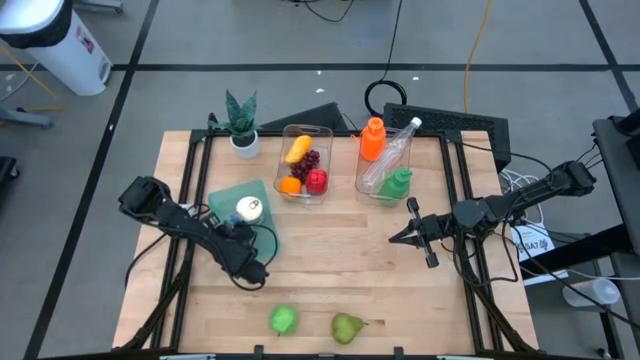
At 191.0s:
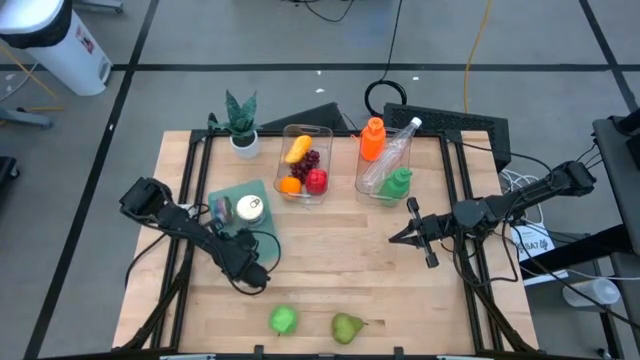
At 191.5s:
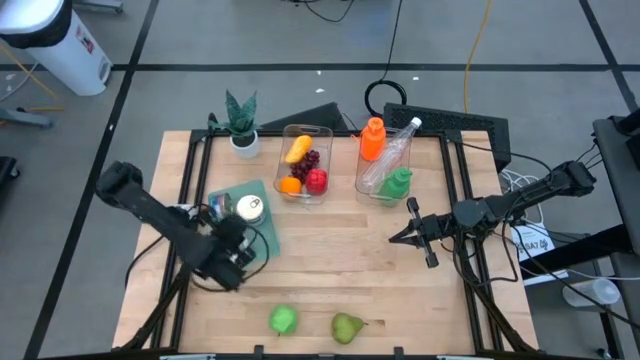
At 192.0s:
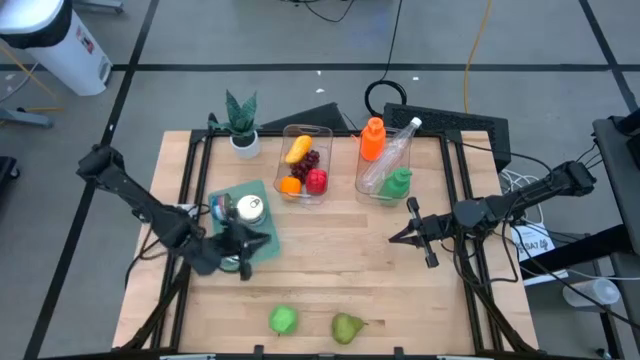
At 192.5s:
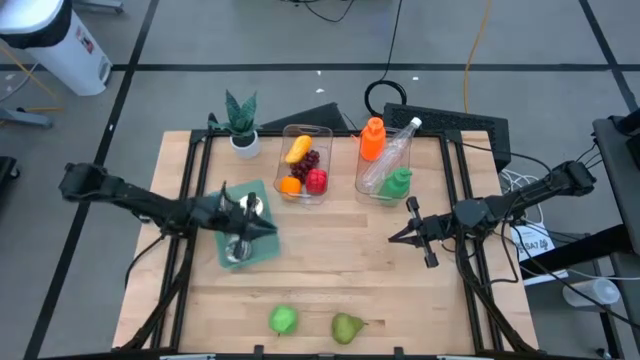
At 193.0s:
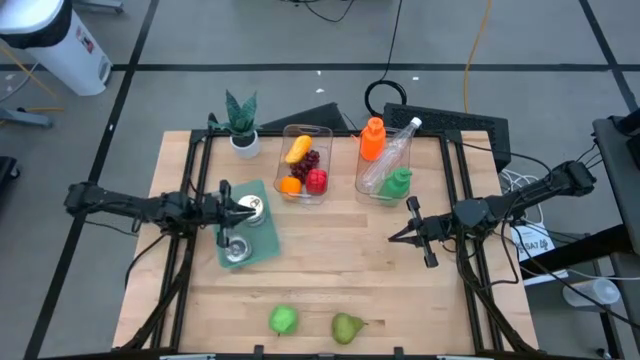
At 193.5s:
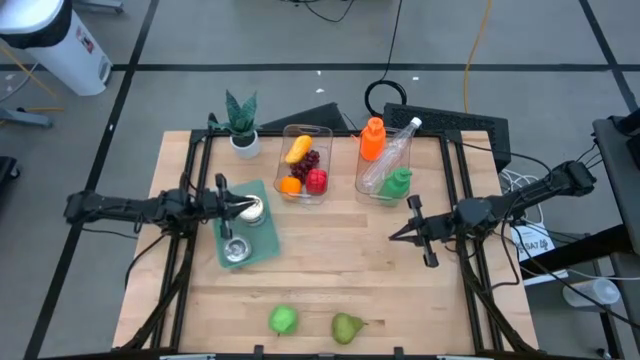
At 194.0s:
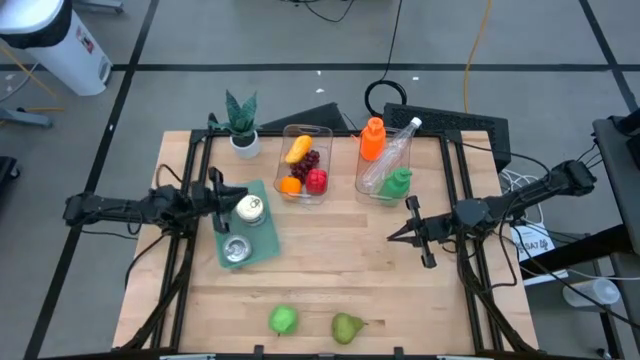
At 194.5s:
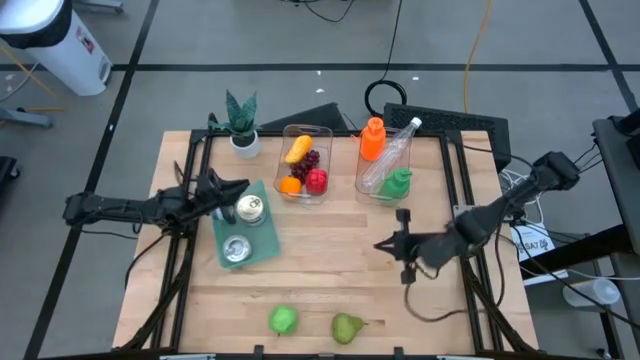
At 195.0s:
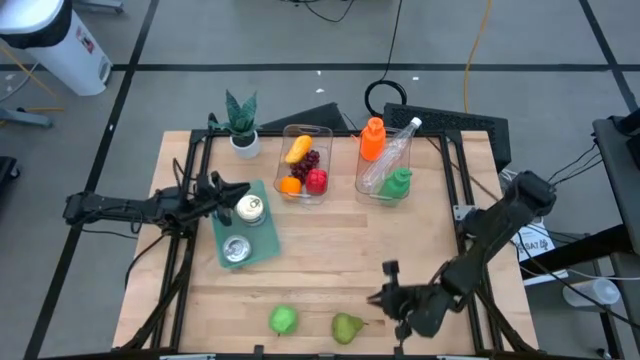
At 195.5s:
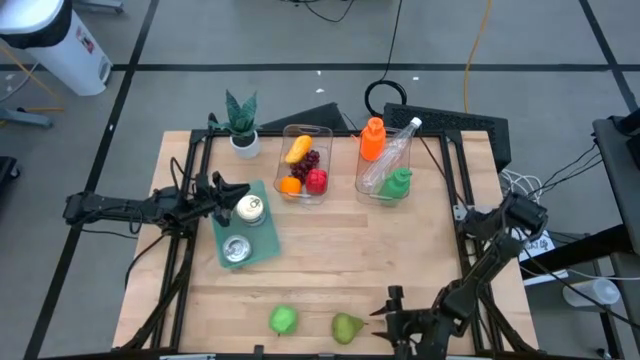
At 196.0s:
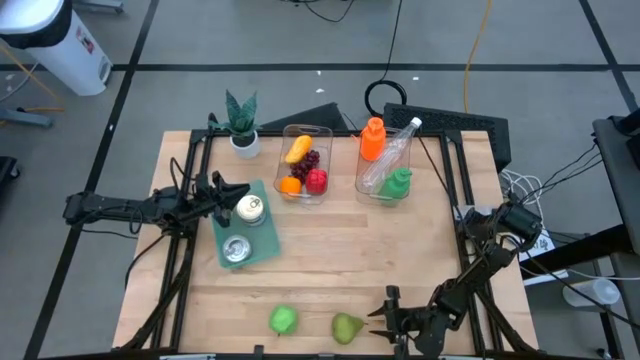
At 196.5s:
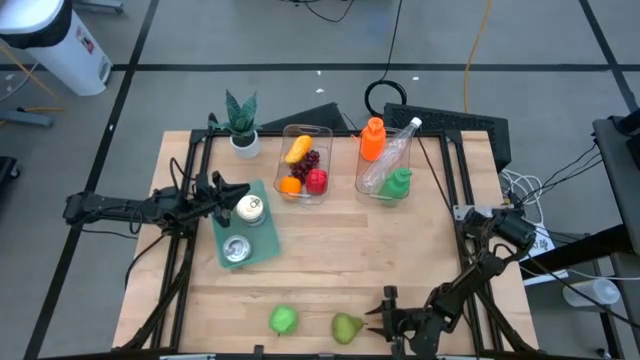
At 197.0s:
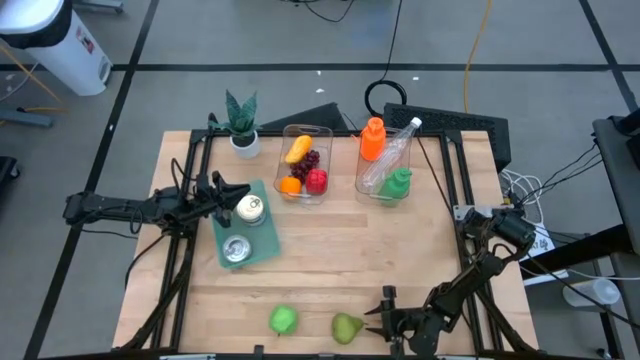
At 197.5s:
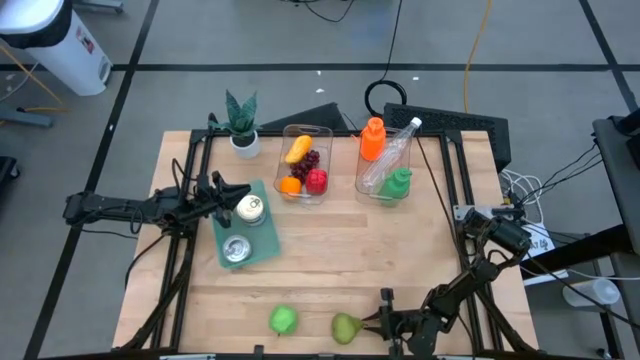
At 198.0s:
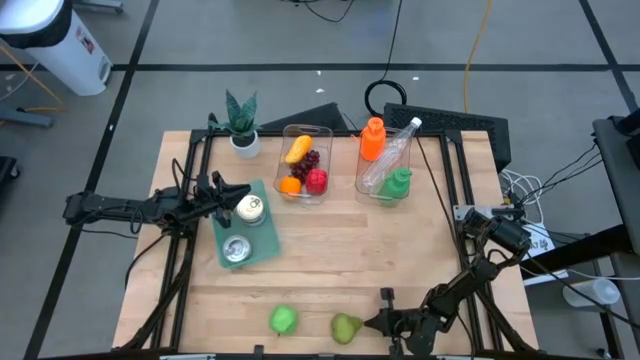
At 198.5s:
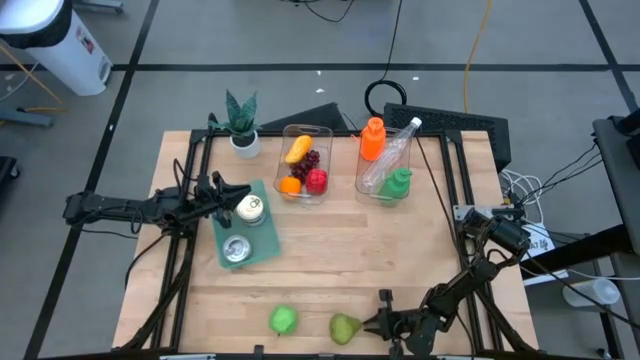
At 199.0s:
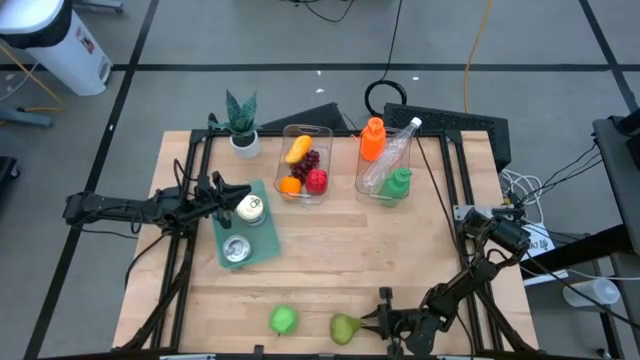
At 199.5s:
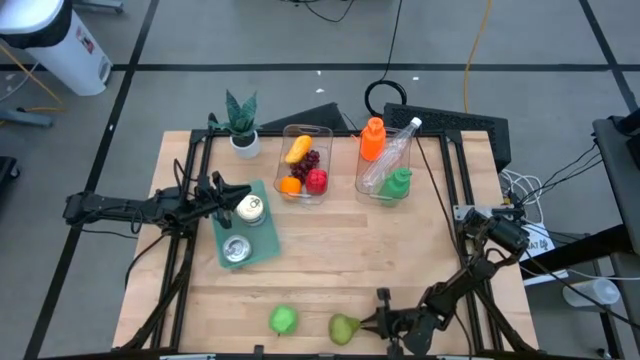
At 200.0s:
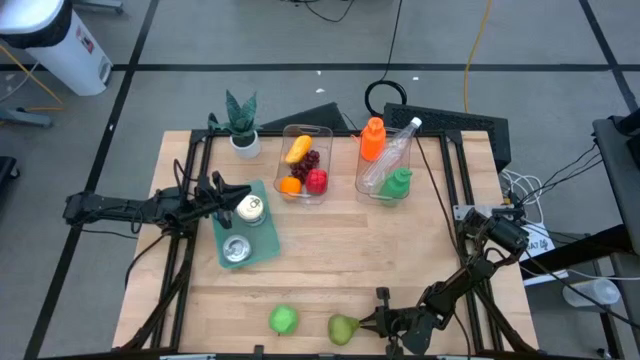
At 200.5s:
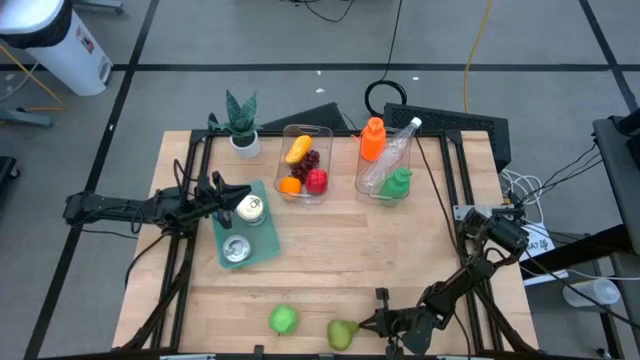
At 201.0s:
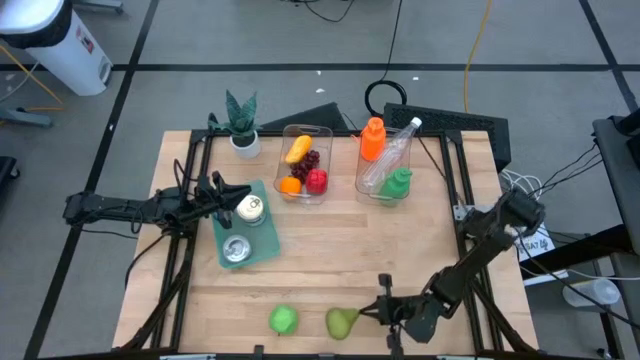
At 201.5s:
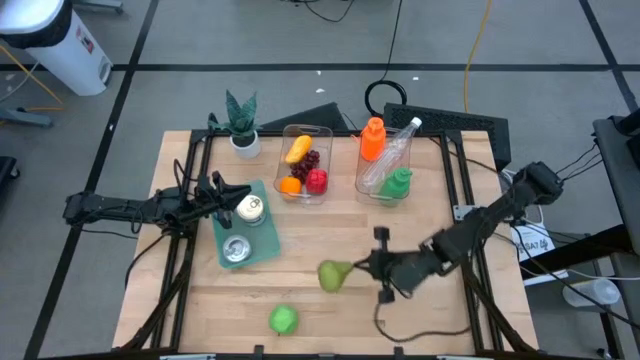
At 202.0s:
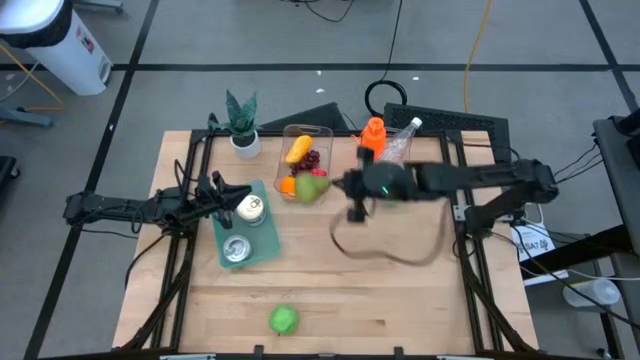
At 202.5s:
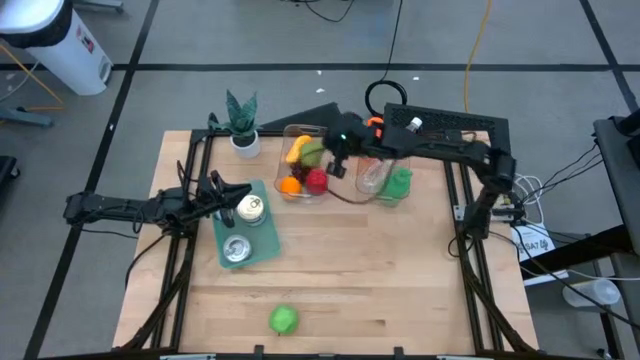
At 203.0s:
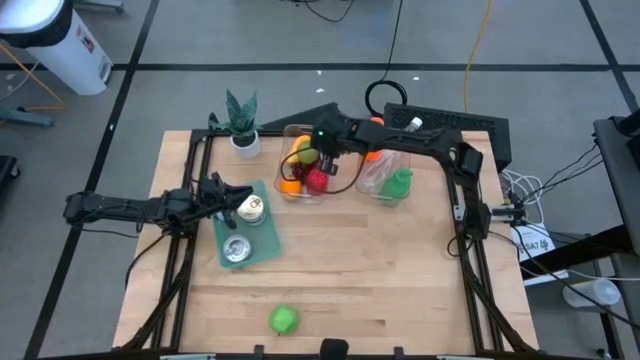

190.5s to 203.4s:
Task: Pick & Place Food Item
Put the pear into the left transparent bin

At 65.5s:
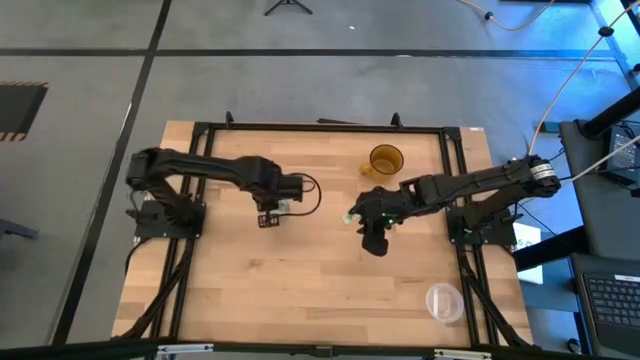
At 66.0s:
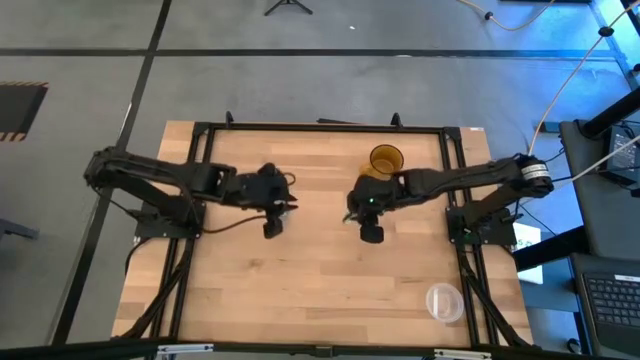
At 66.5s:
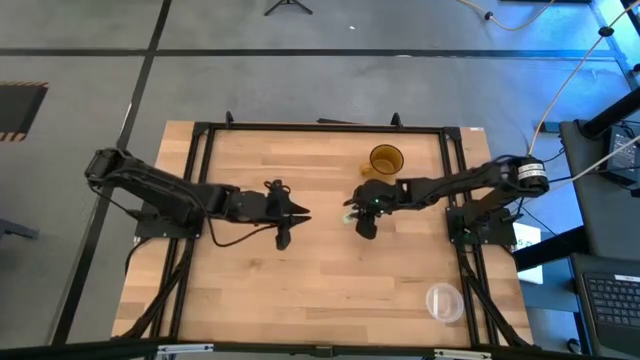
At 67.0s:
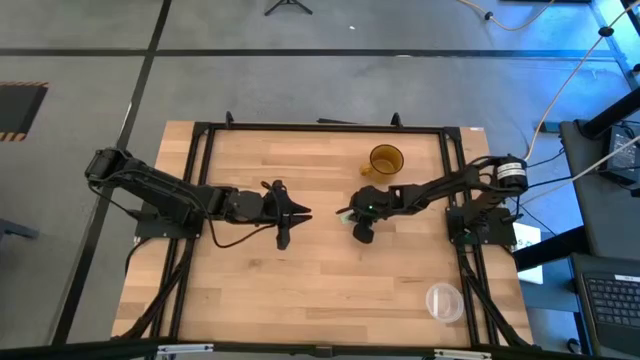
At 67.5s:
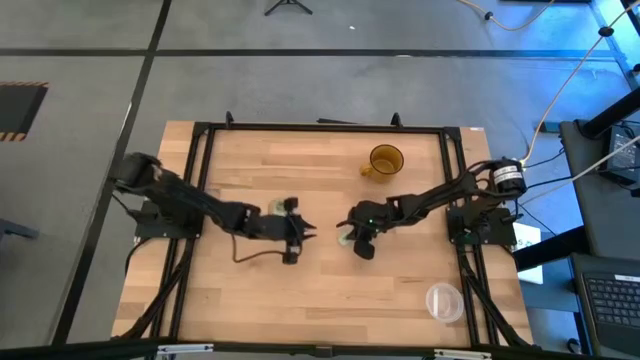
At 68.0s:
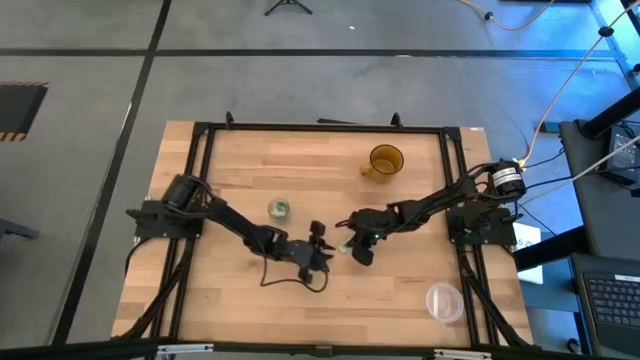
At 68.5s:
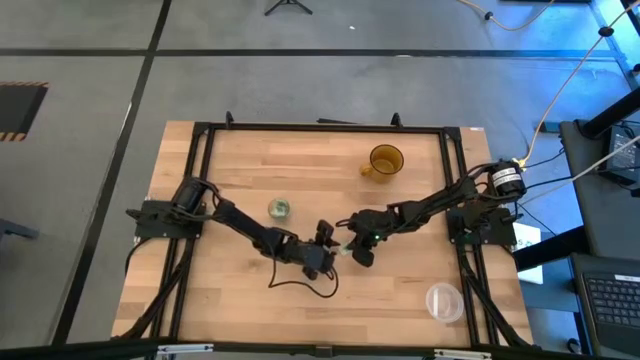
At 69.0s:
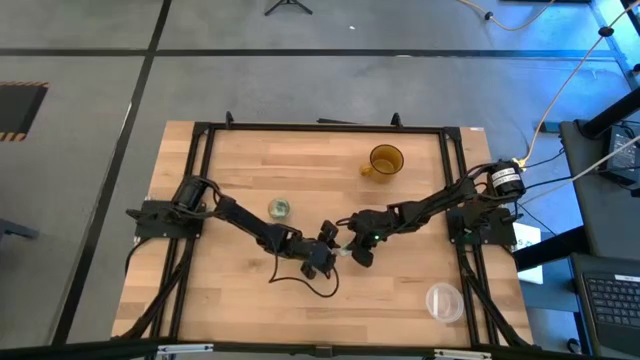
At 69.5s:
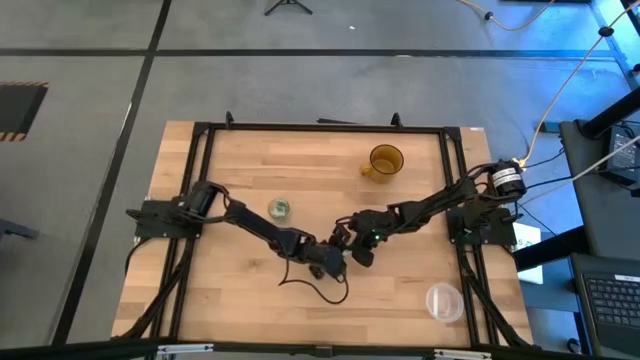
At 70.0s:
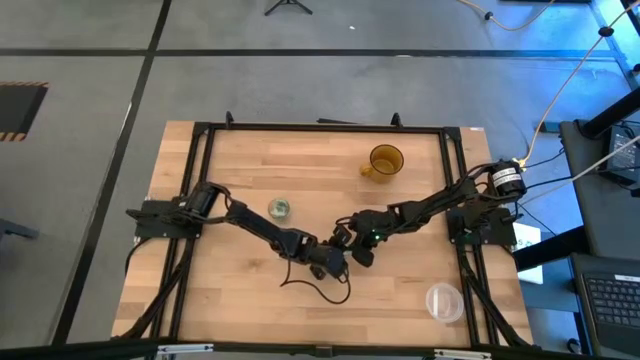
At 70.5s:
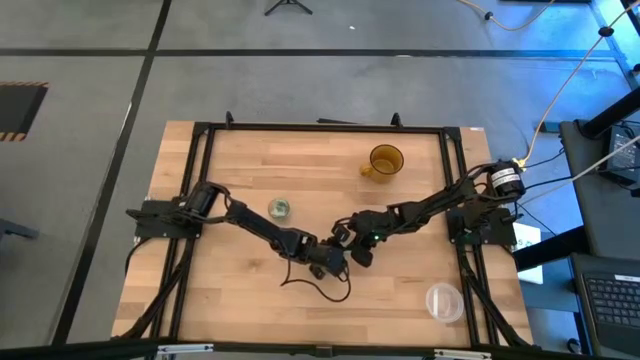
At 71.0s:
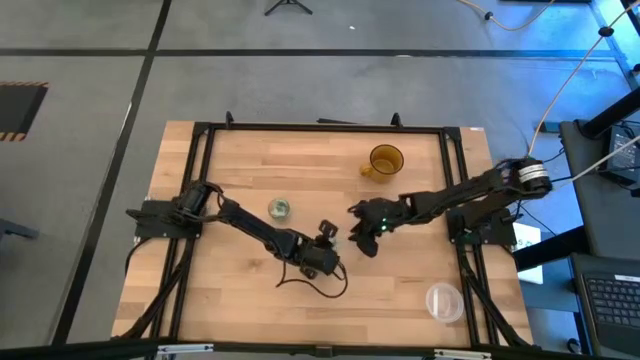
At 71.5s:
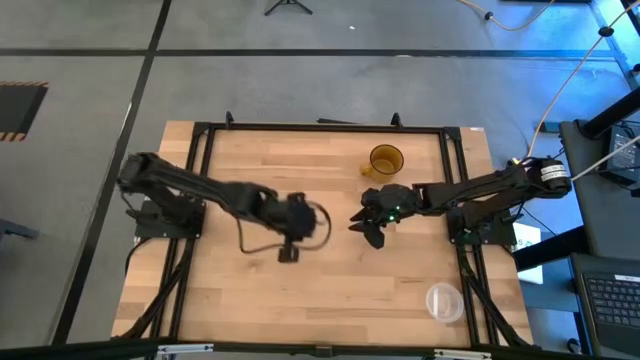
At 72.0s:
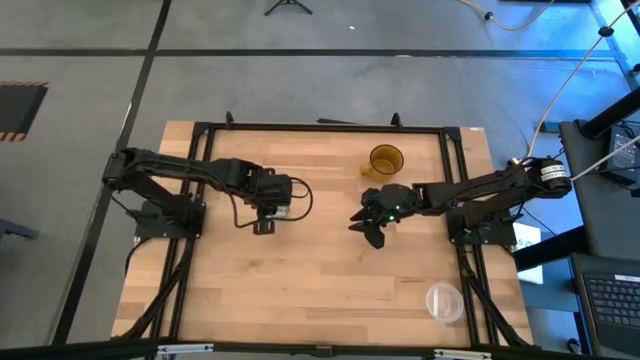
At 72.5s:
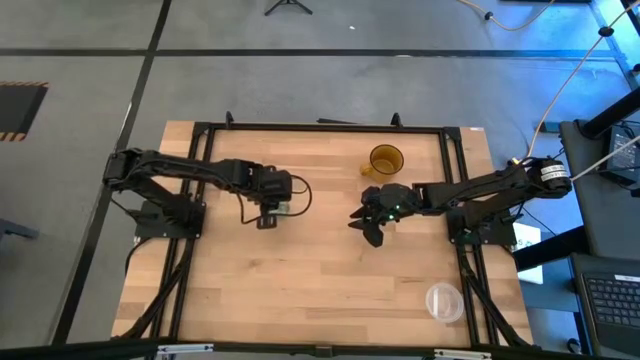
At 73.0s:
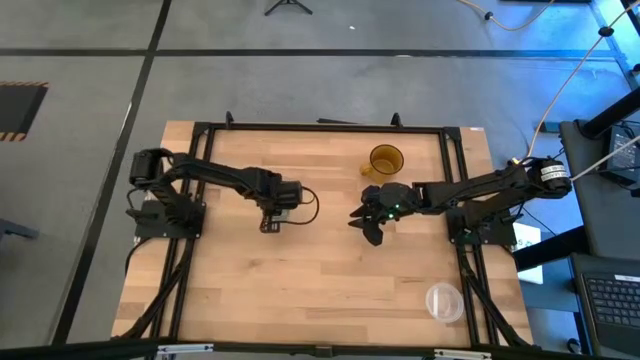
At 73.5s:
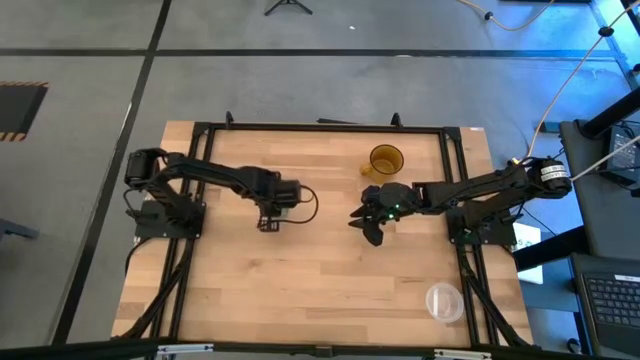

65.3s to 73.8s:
Task: Pick and place Stevia / Truvia into bins
Put the stevia packet into the transparent container
